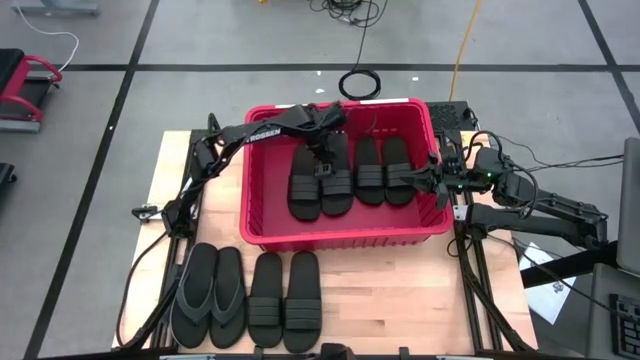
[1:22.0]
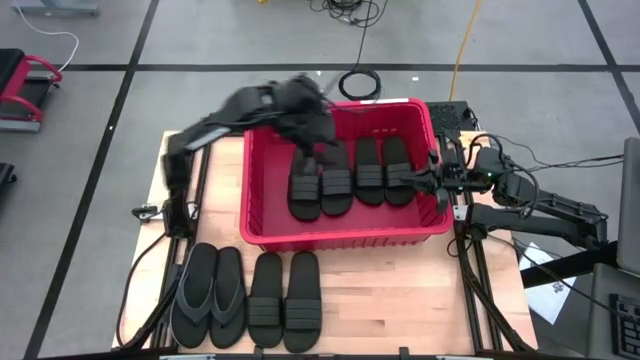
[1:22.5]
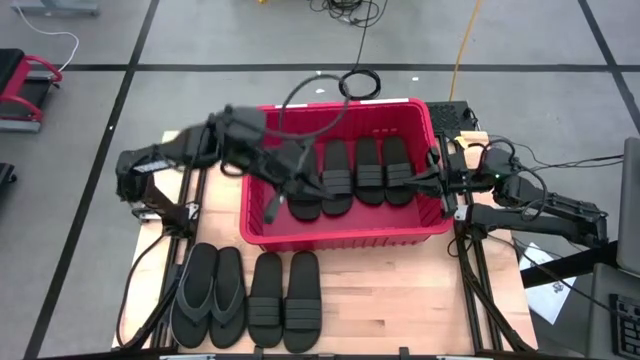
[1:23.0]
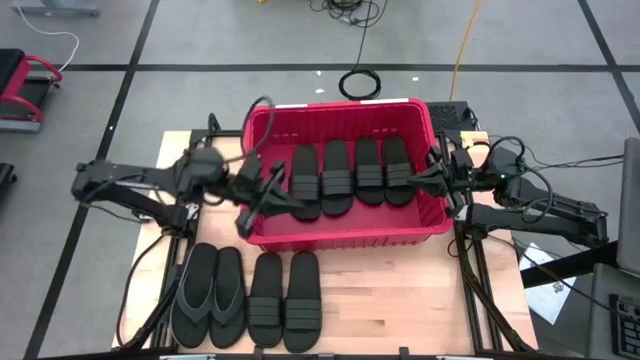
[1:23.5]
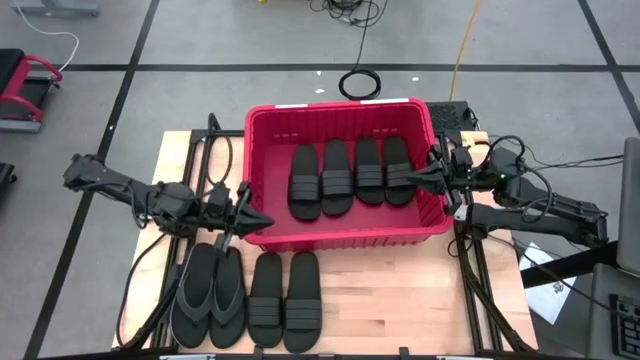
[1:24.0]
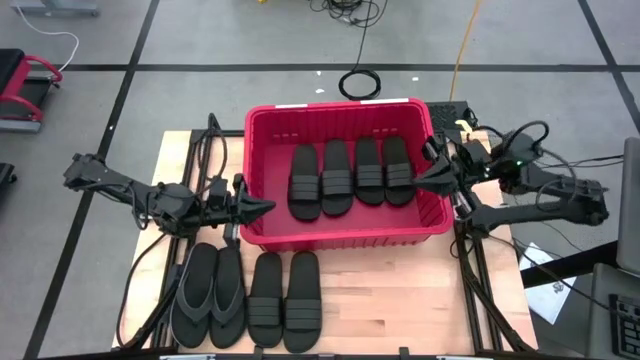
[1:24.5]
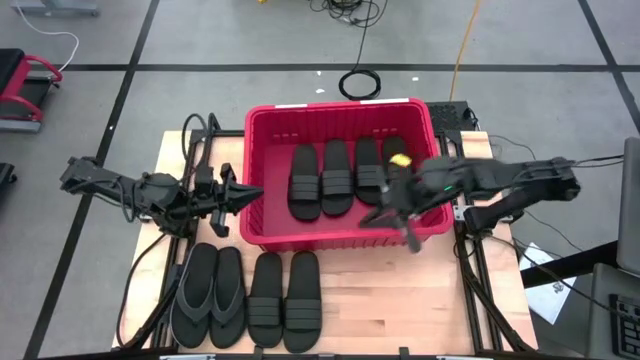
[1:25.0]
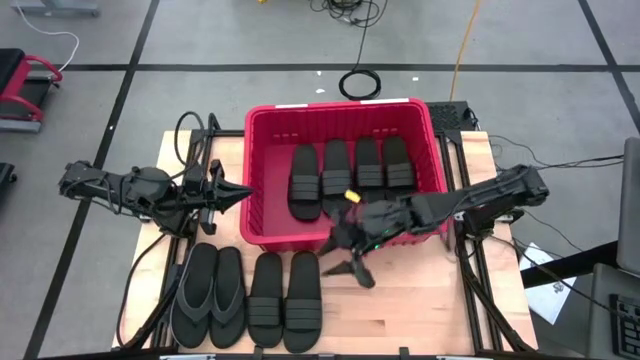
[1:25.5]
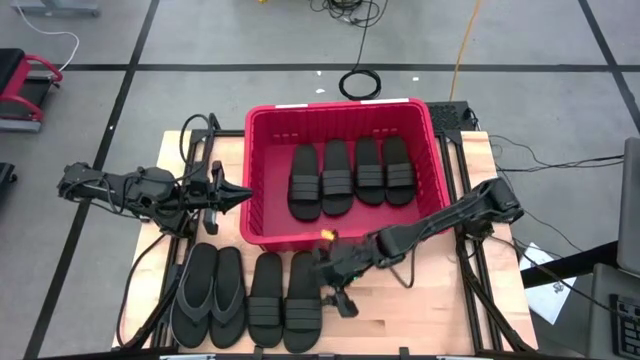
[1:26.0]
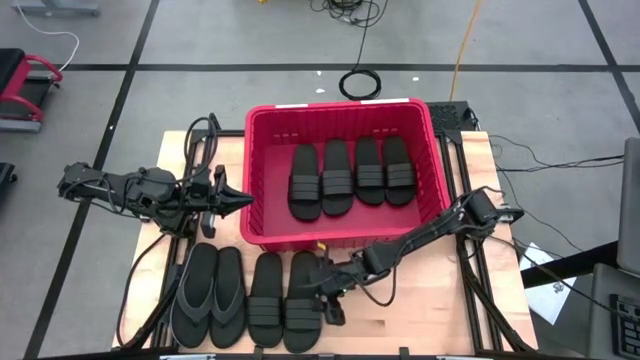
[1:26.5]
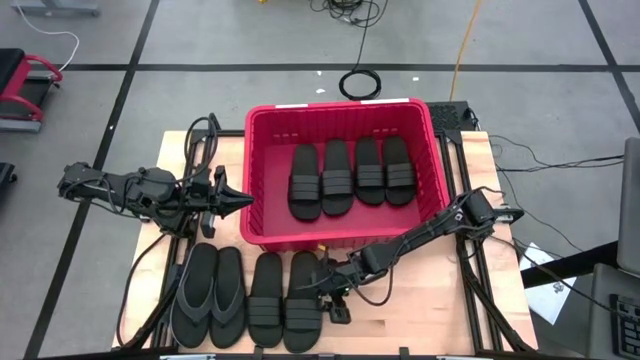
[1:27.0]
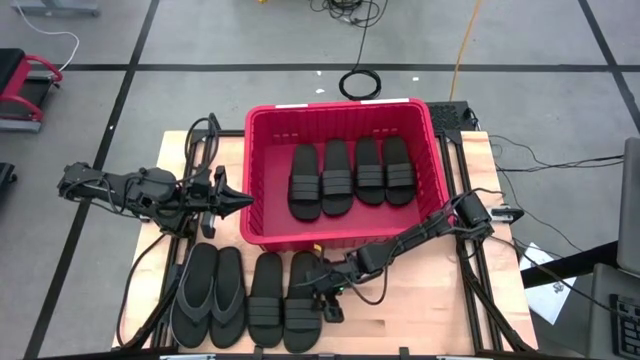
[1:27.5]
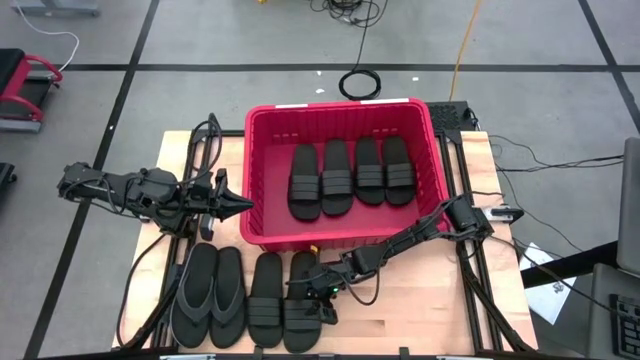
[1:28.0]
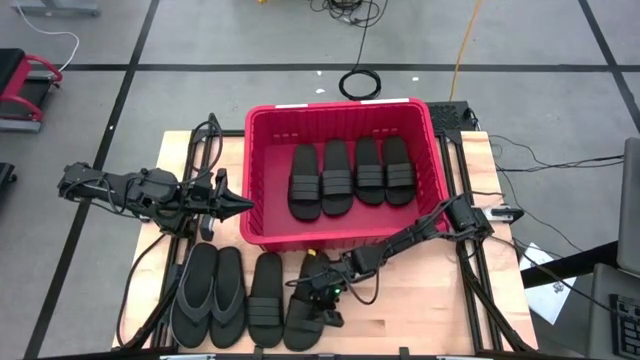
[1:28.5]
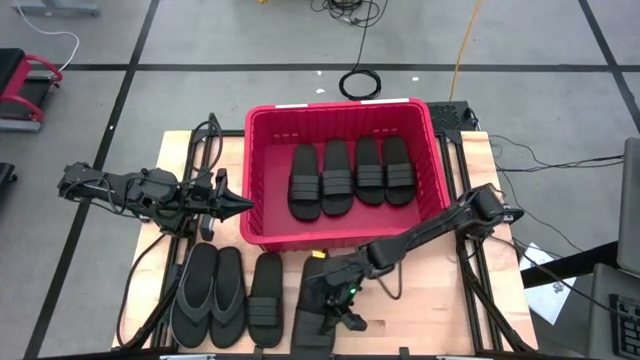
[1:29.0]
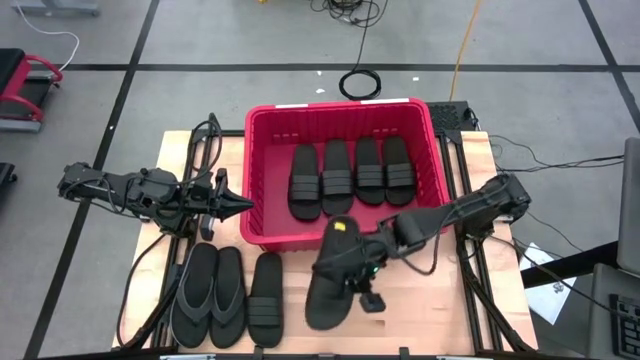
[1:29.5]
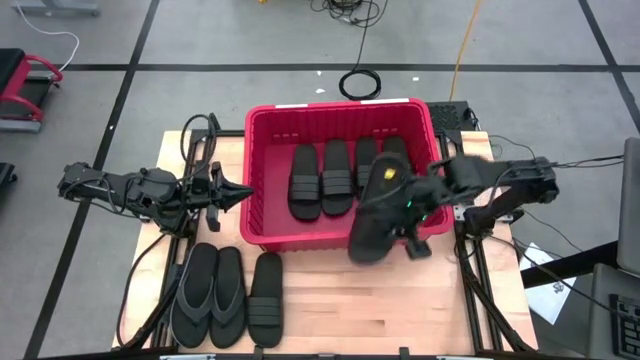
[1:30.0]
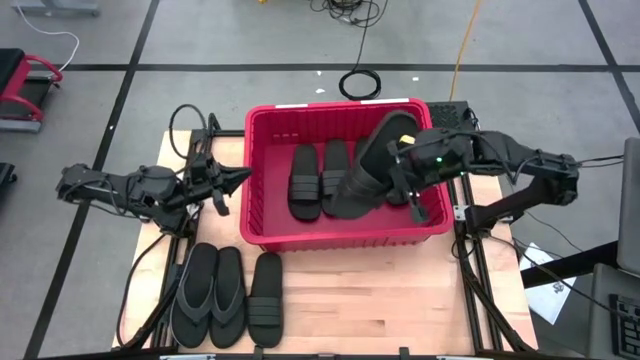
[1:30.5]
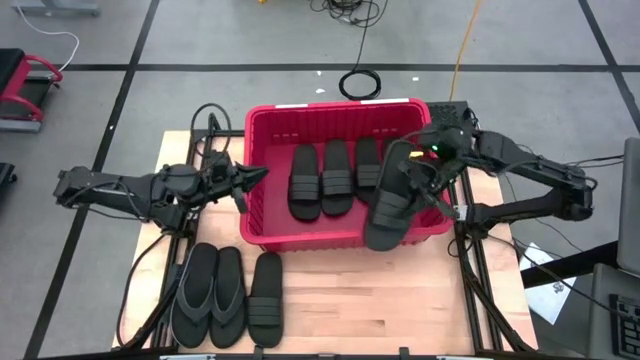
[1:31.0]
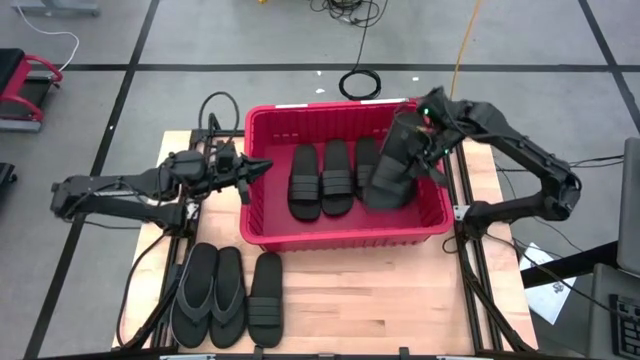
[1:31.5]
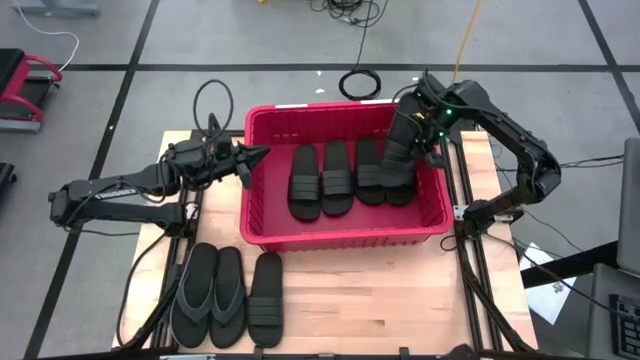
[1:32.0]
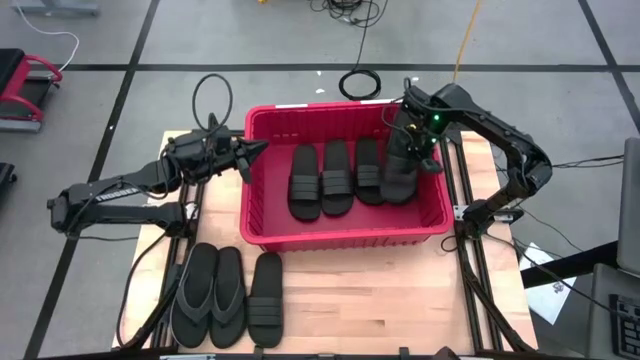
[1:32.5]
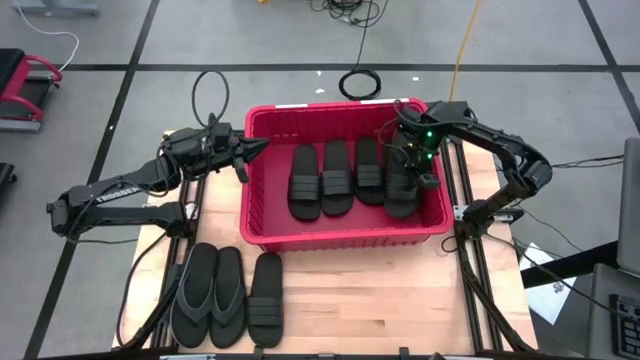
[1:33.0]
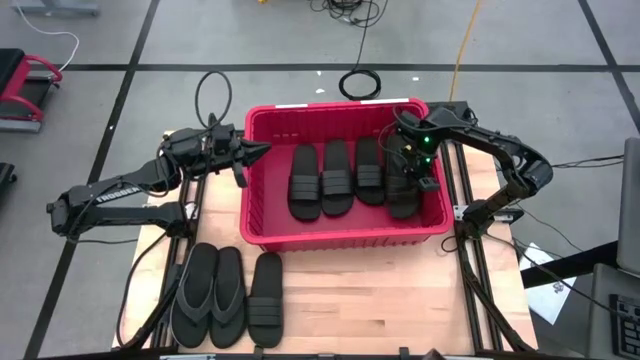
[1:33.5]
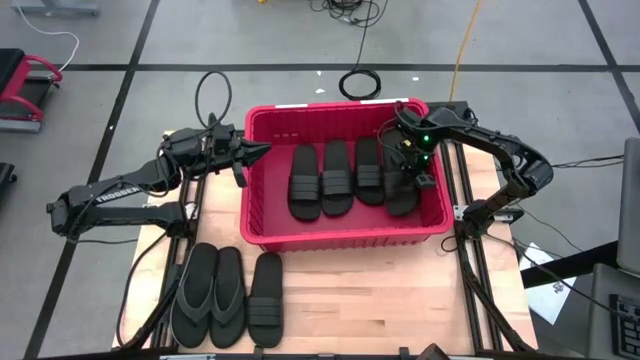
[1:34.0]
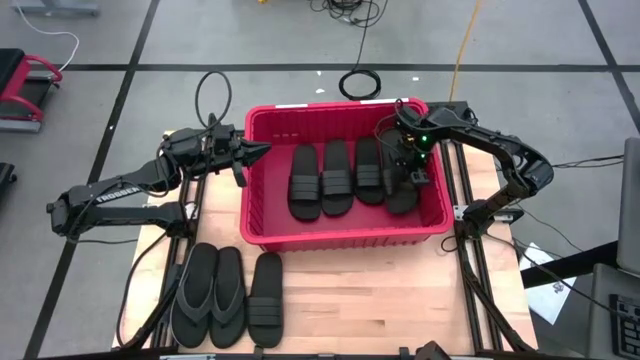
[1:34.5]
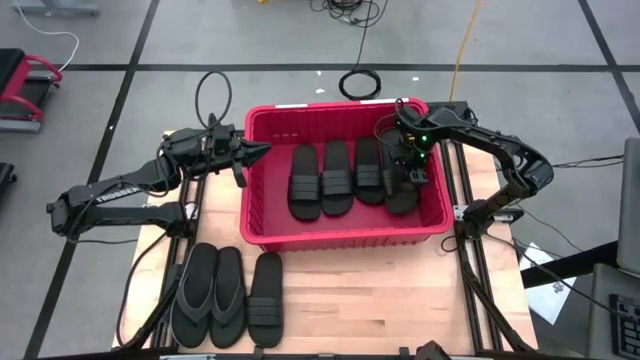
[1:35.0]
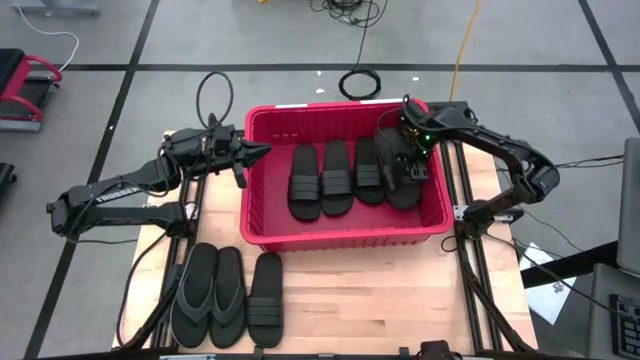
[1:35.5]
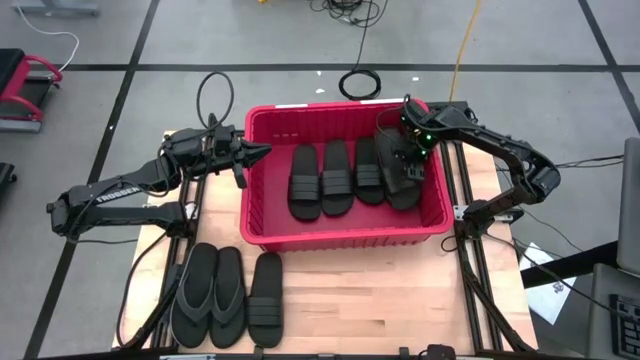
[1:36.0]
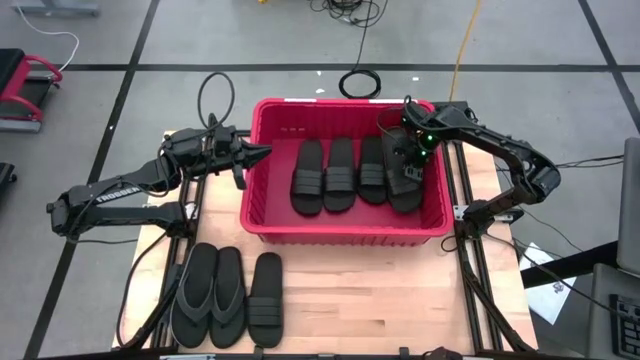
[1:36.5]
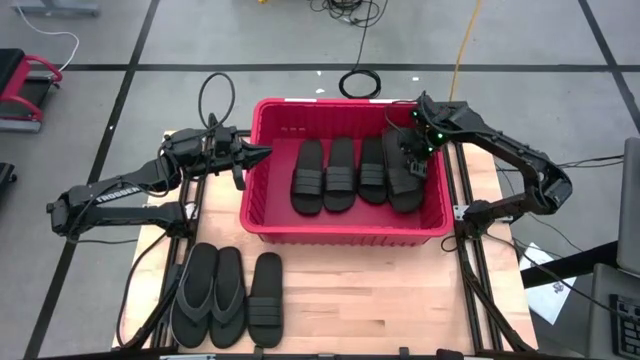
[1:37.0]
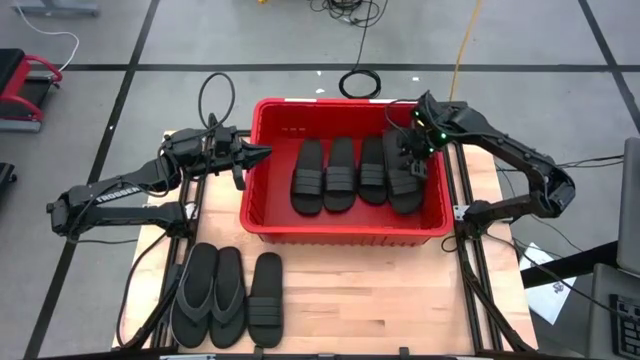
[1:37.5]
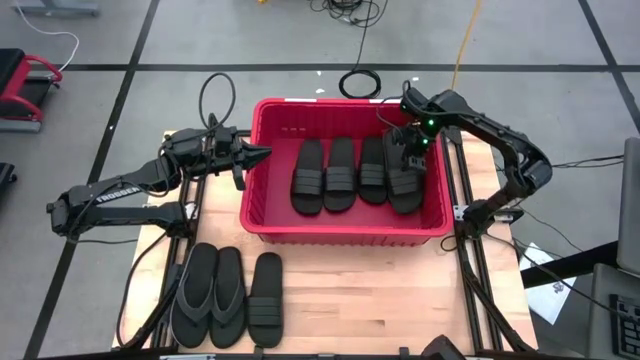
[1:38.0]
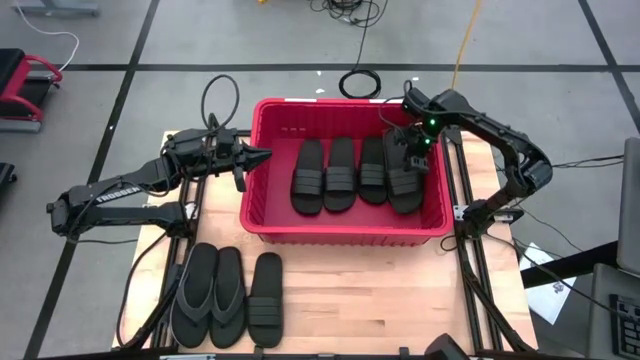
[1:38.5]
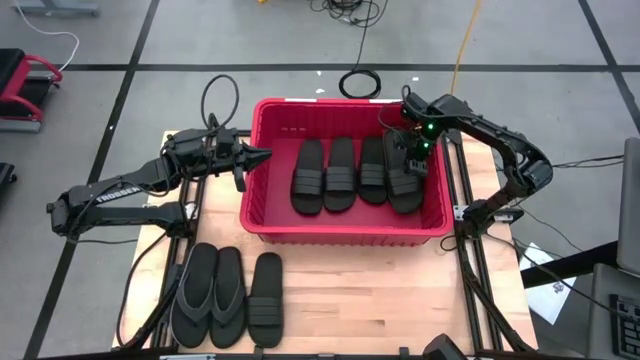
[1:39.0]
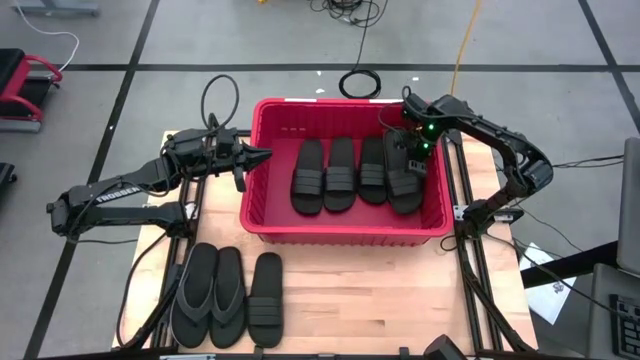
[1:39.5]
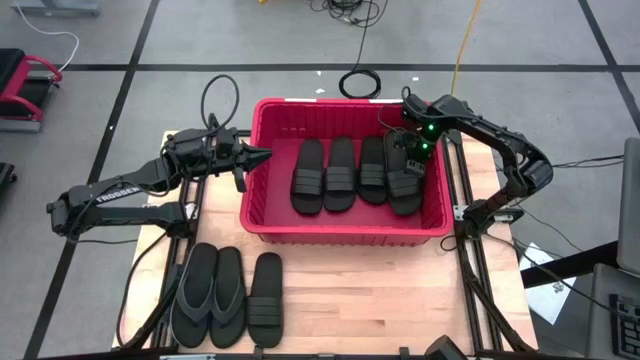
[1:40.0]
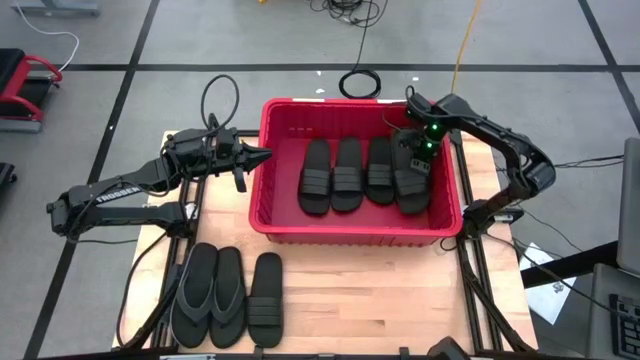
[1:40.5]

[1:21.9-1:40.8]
Task: Pick and place slides into bin
Put the black slide into the red bin

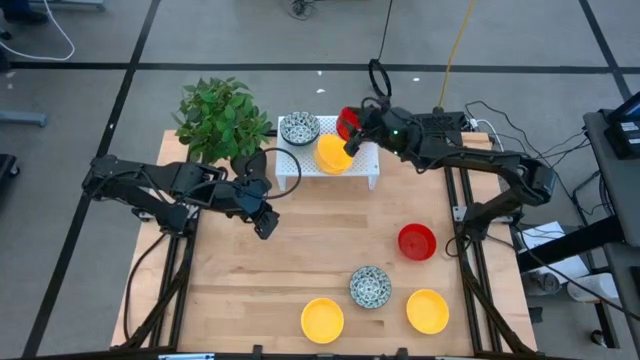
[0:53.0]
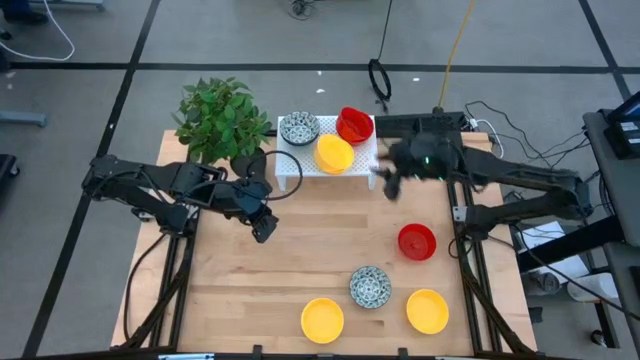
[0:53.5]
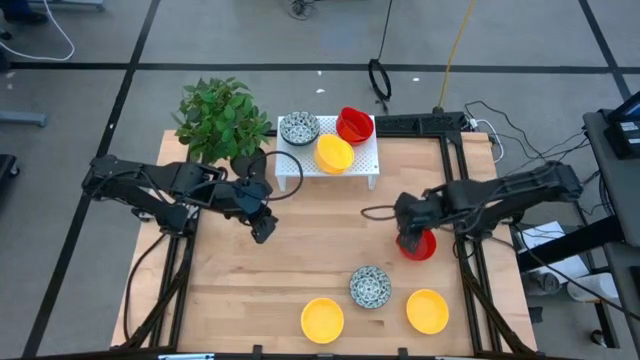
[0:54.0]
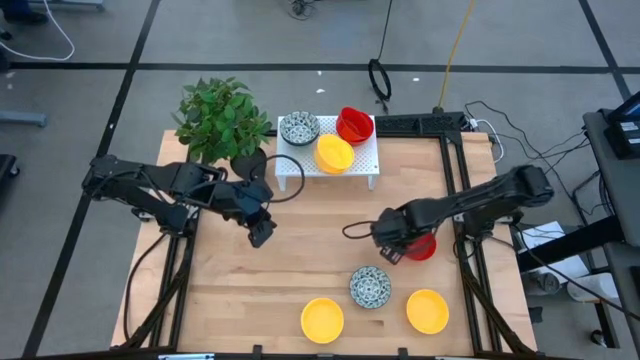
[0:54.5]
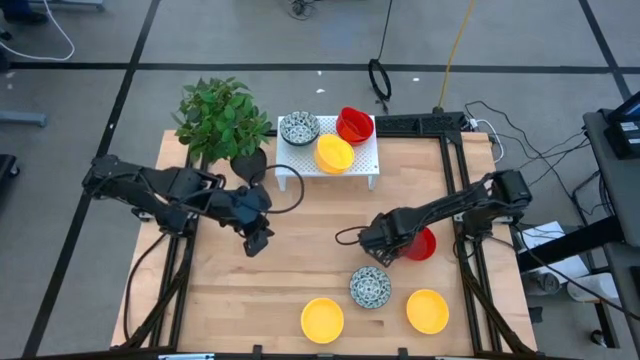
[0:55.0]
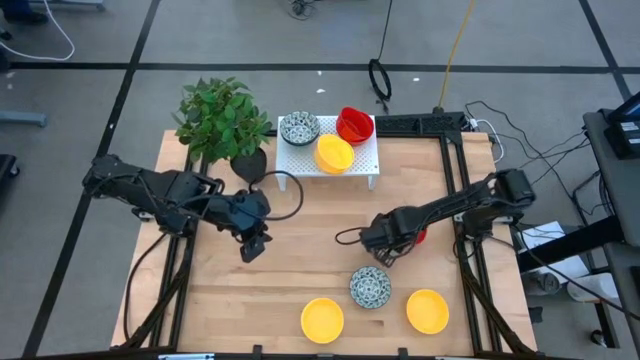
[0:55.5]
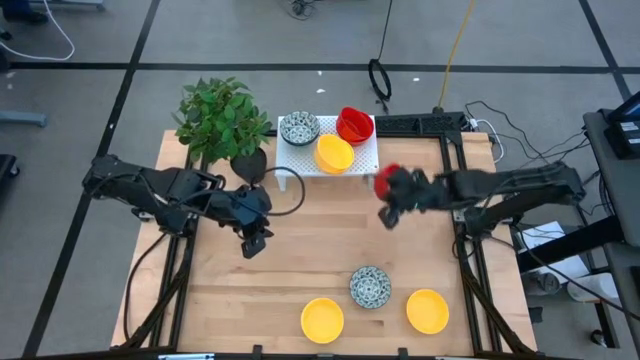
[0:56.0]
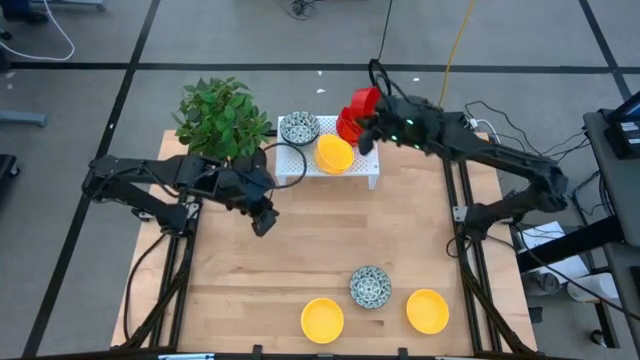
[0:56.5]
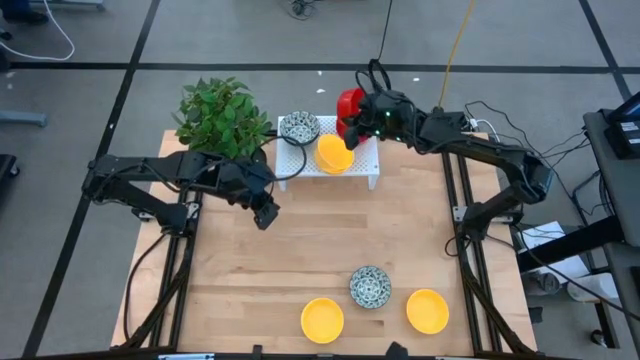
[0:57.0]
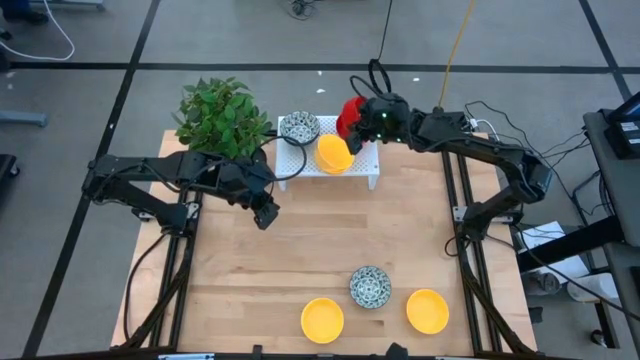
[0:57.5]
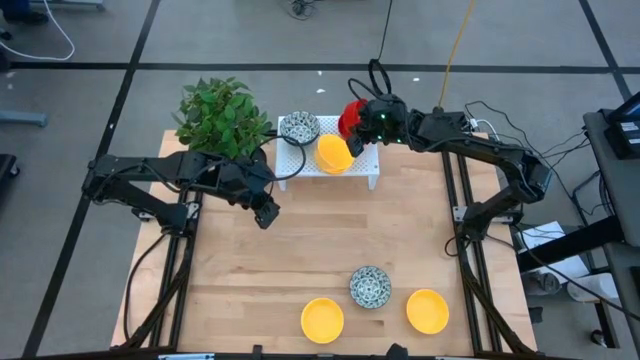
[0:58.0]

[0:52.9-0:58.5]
Task: Pick & Place Mini bowls
Stack the red bowl on top of the red bowl on the shelf
